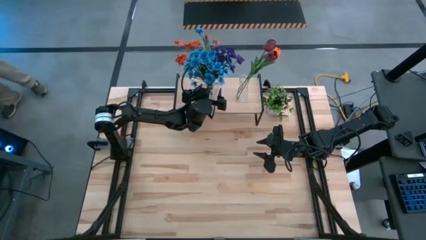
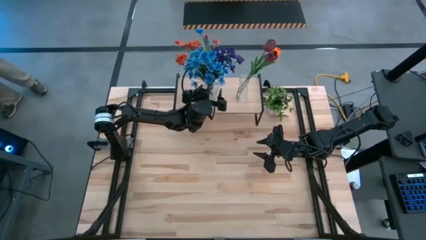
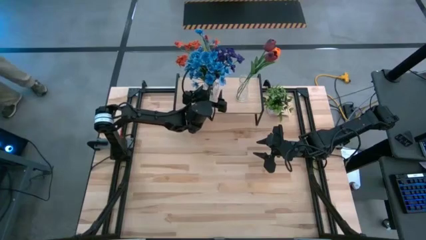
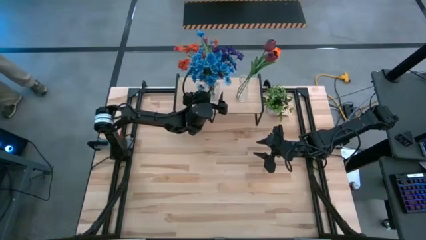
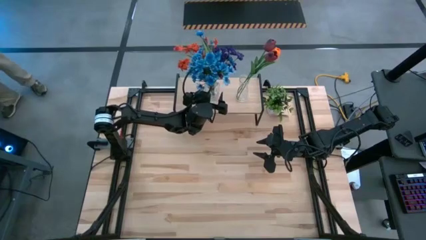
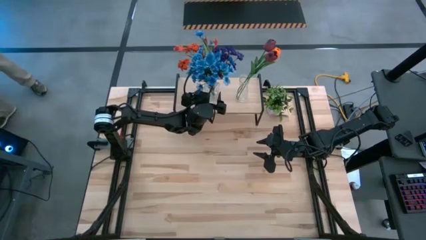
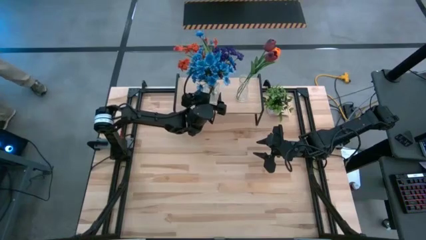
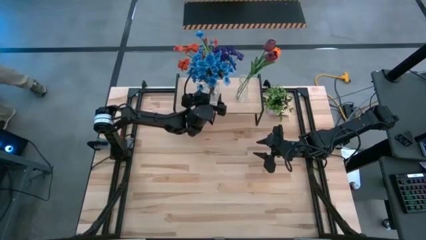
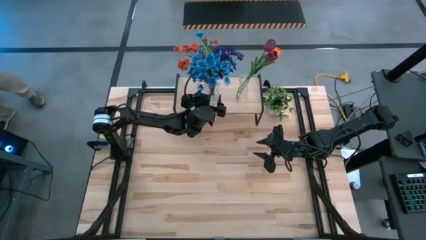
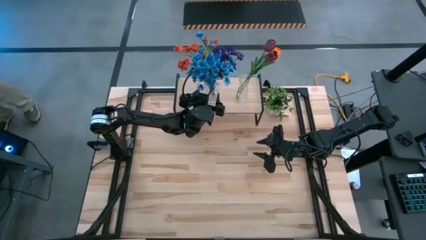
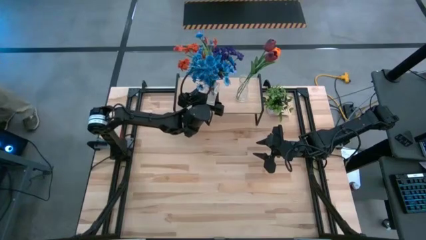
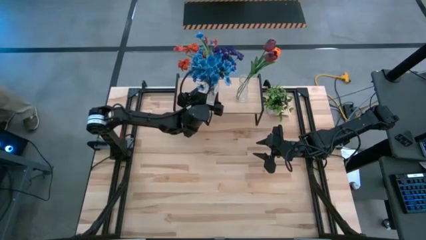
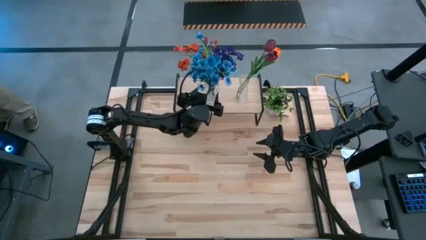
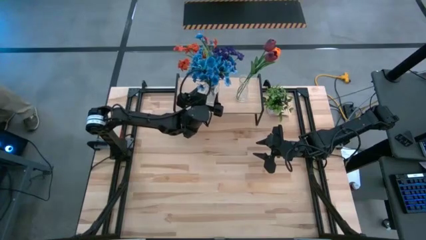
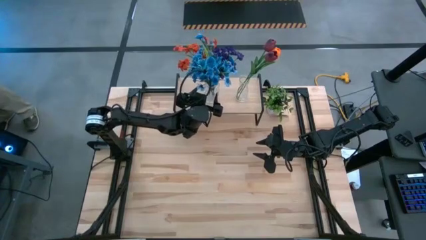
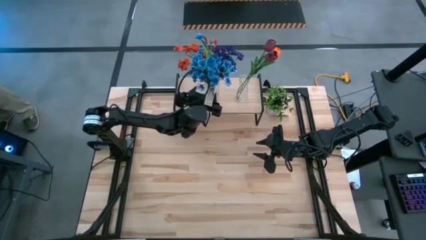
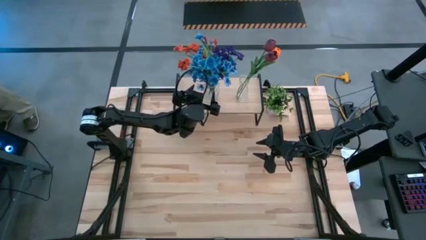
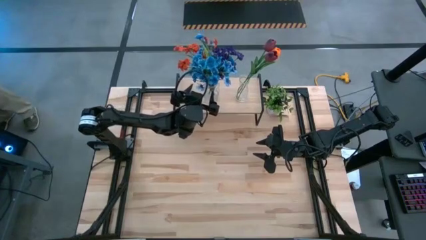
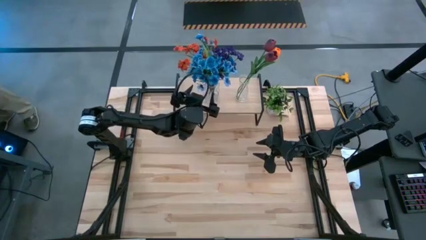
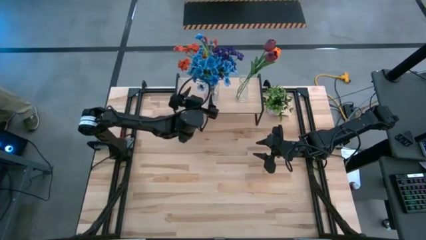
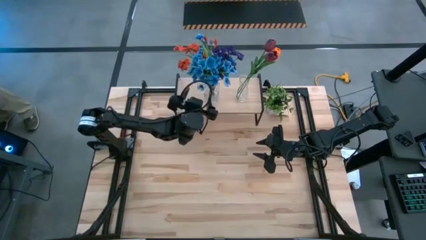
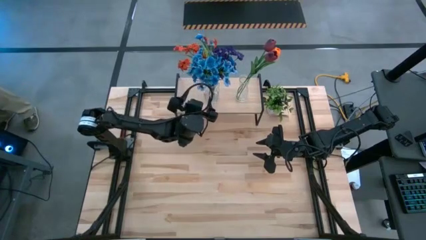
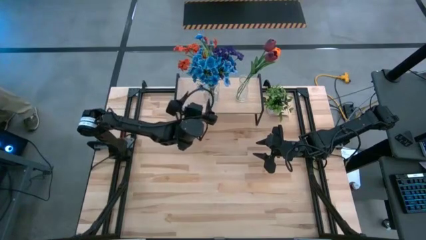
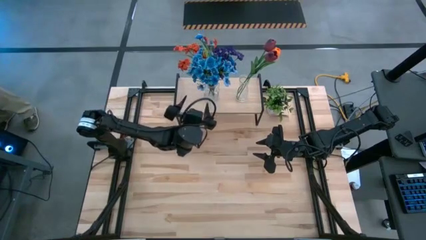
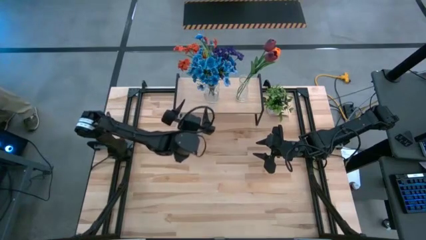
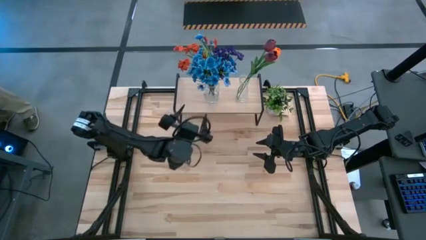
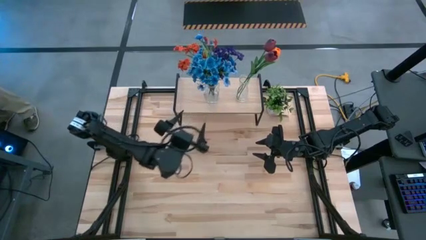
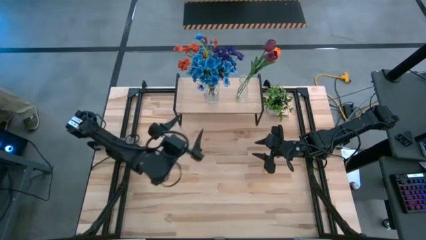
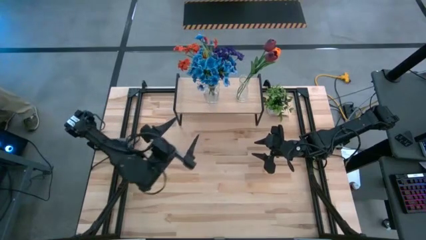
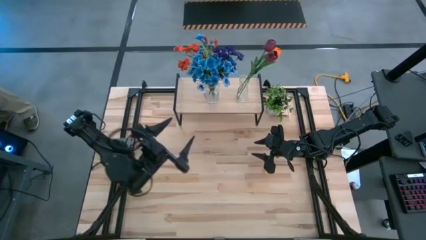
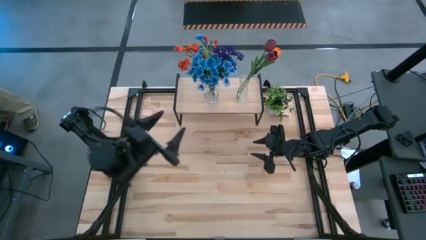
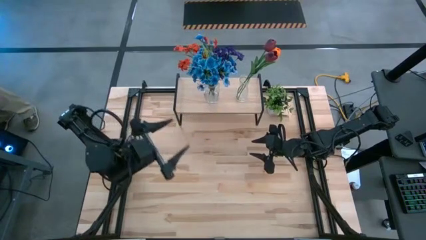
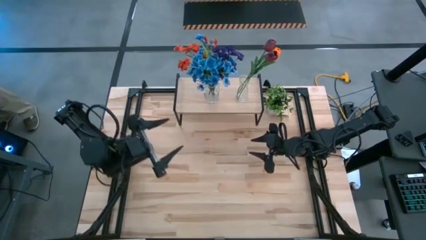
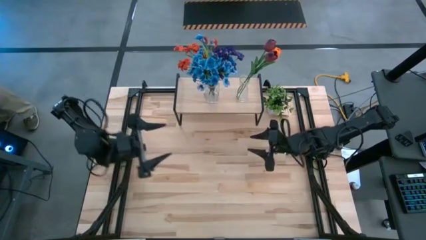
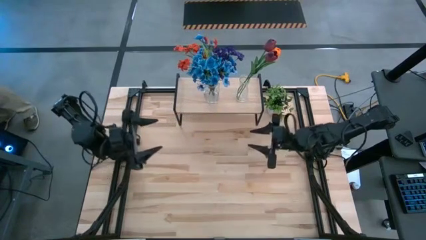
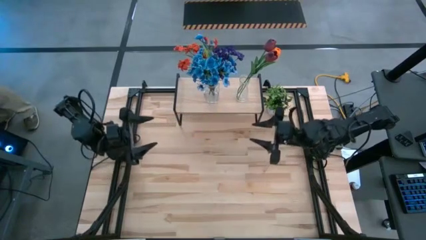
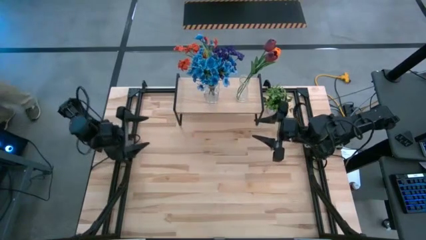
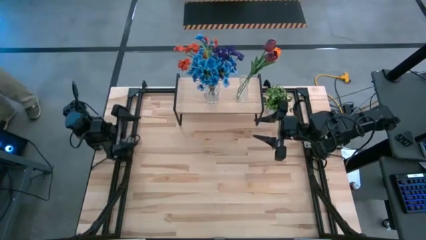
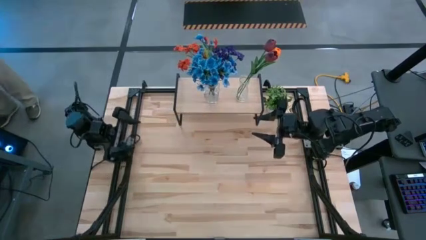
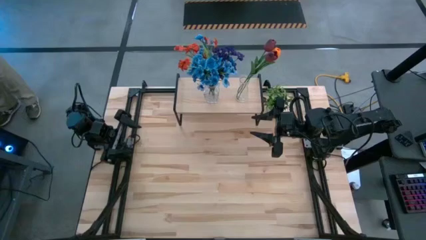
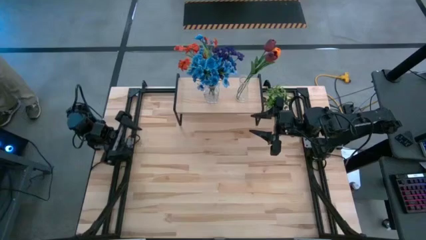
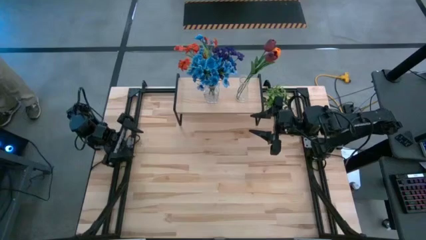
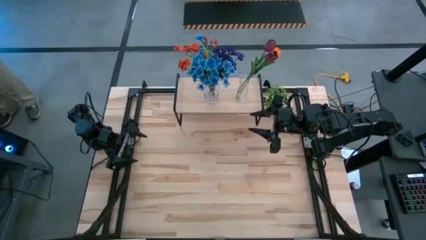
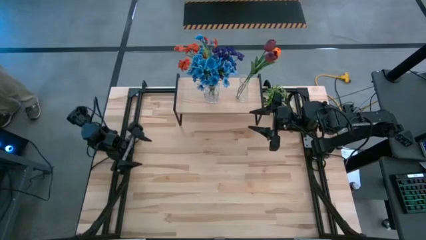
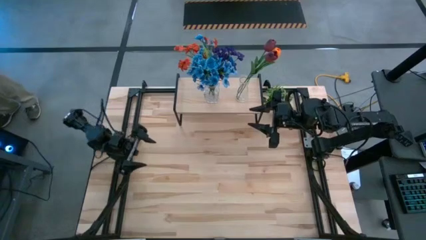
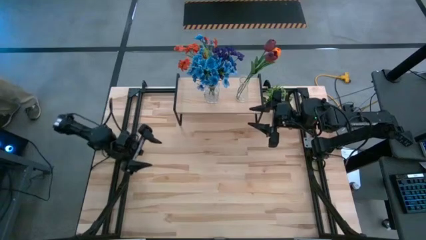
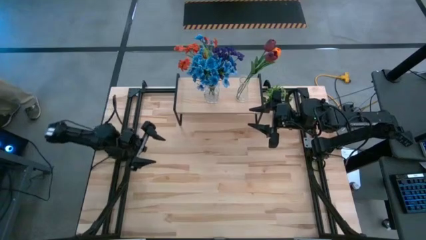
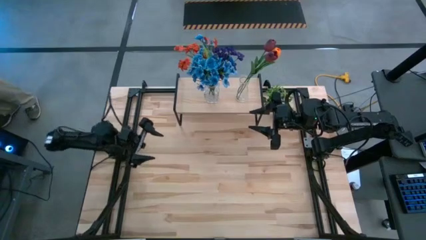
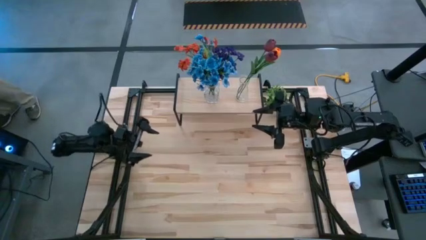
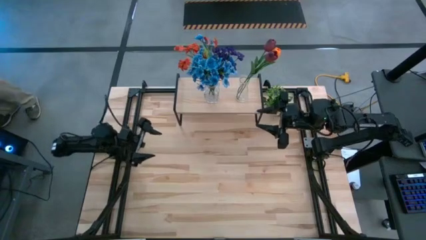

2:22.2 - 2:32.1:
Task: Pick and place flowers into a vace then onto a shelf
Return to Home Position

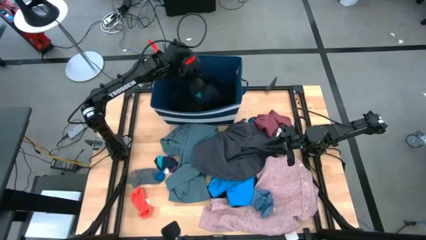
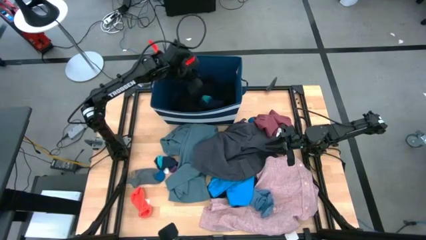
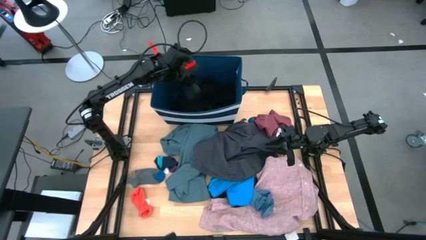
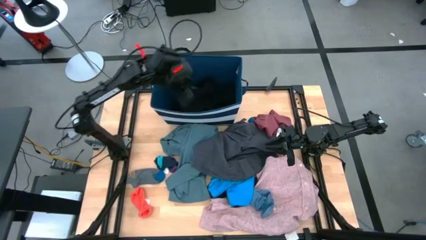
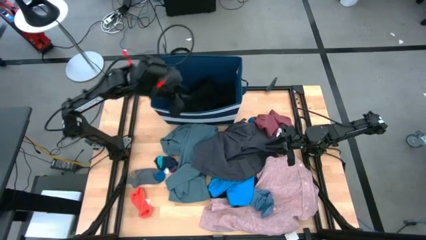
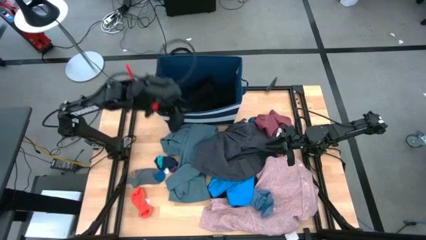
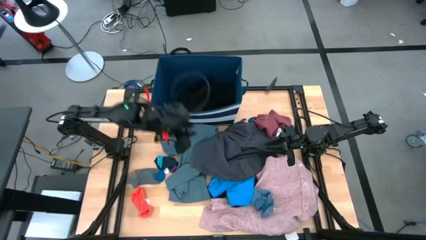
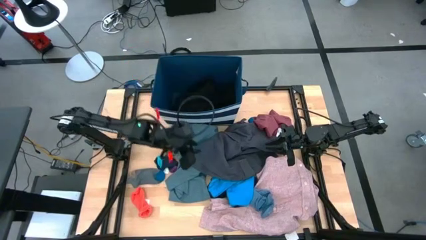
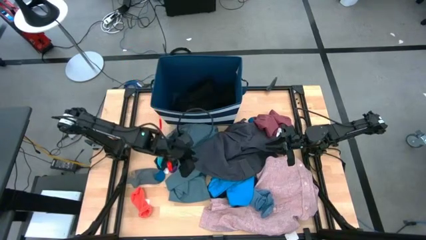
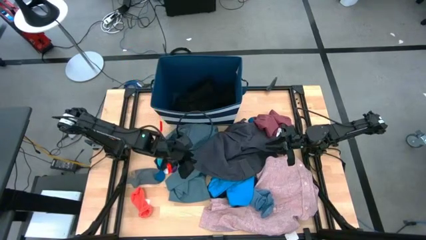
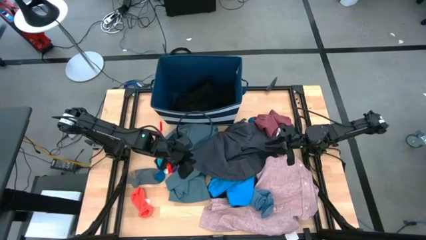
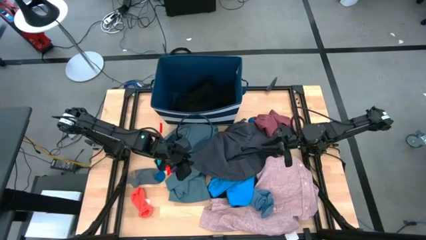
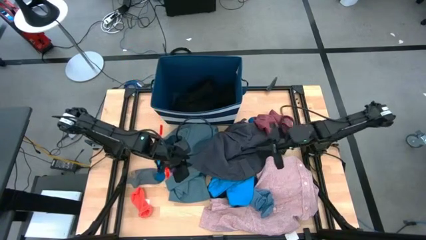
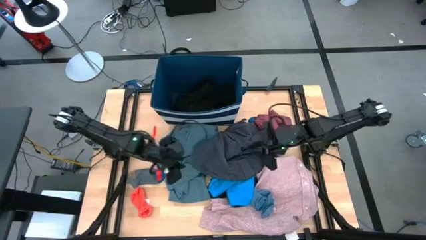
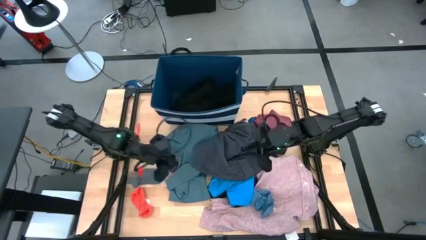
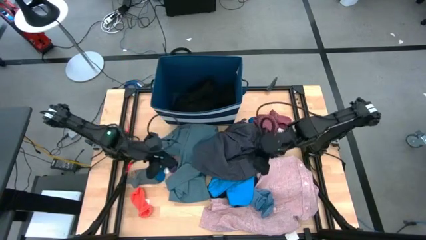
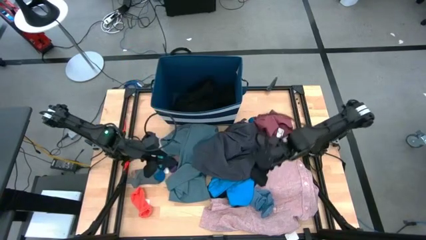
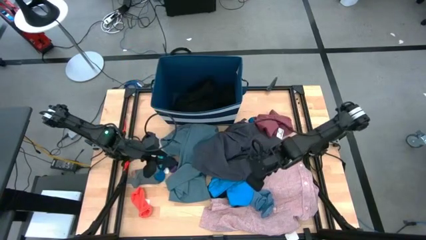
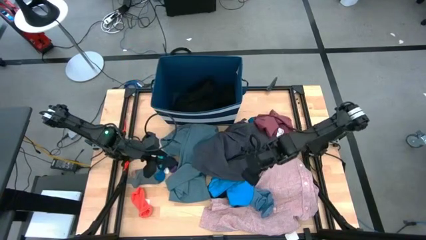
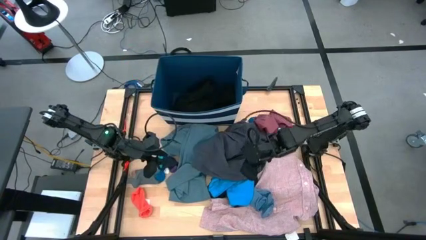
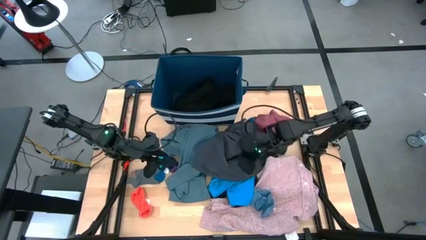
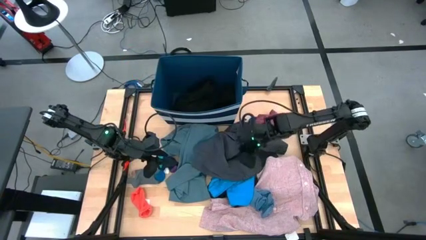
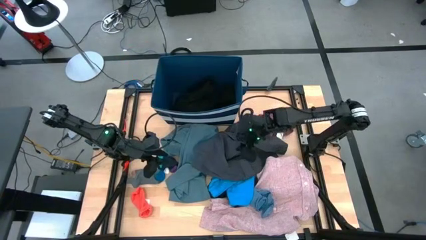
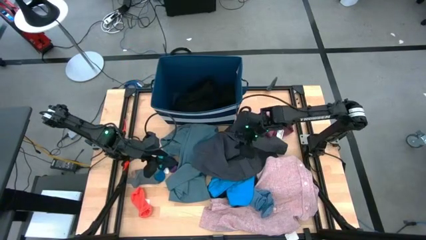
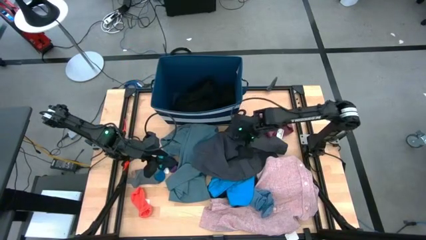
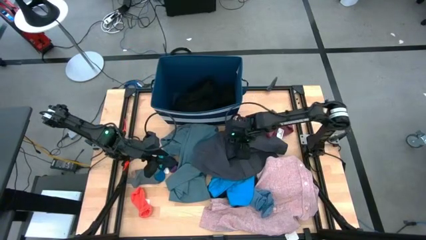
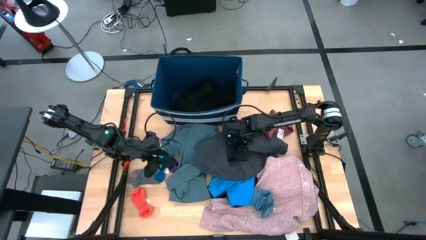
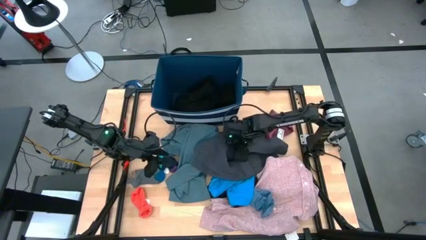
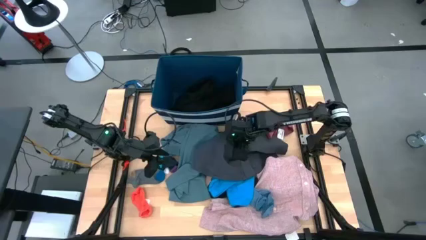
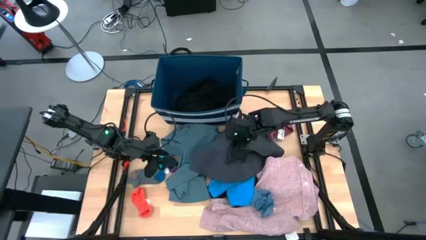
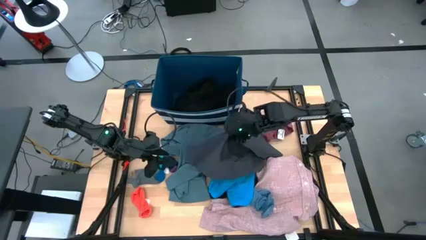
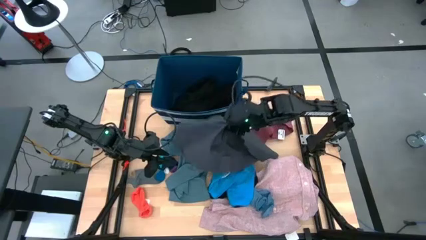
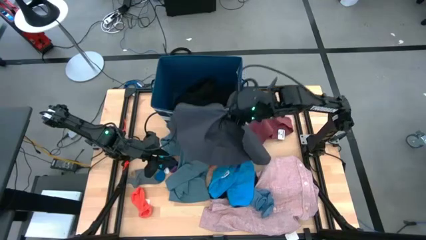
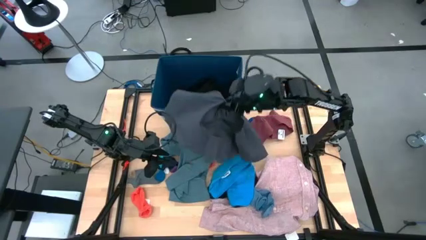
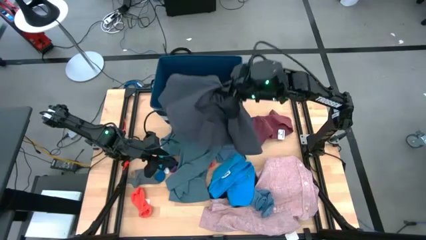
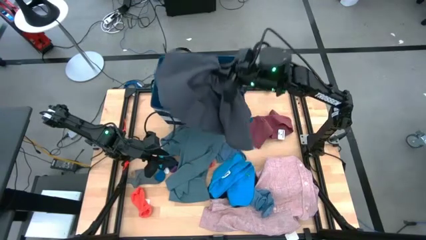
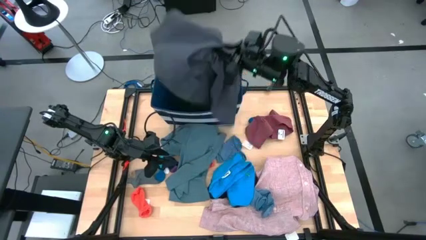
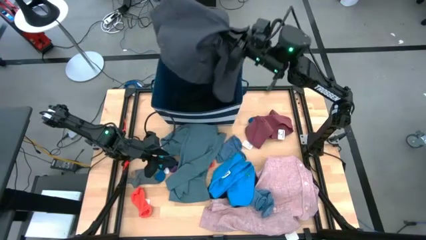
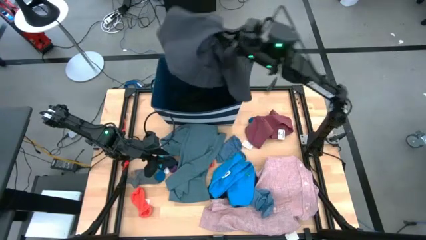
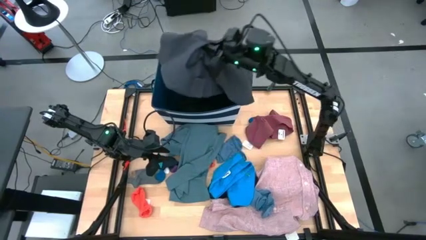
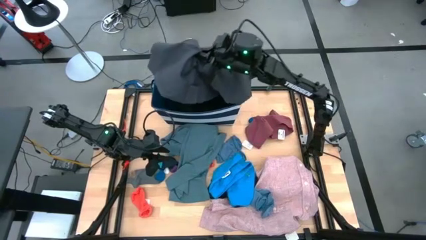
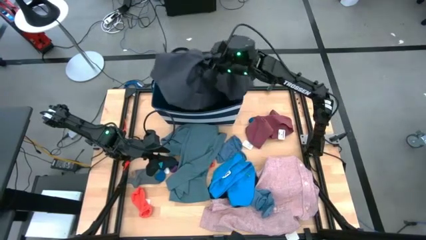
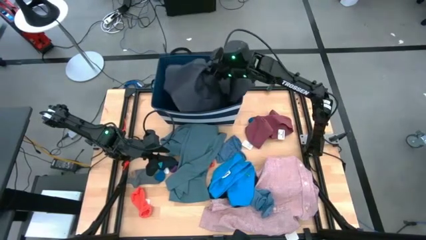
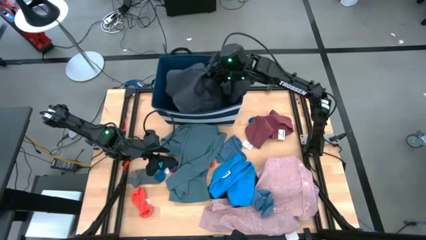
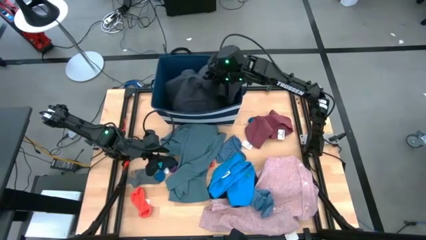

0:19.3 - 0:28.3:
Task: Sort clothes
Put the dark gray shorts into the blue bin
